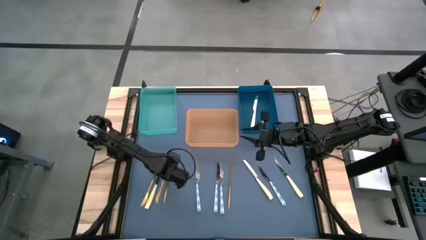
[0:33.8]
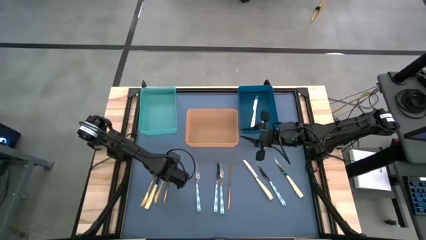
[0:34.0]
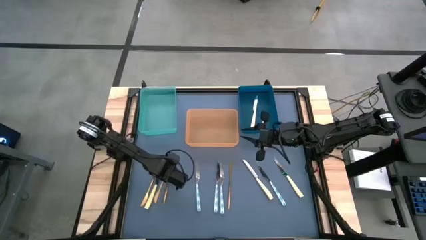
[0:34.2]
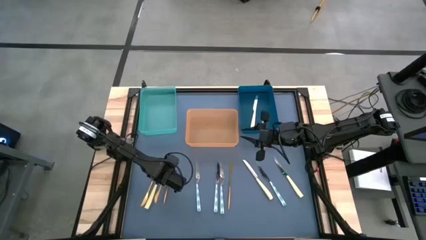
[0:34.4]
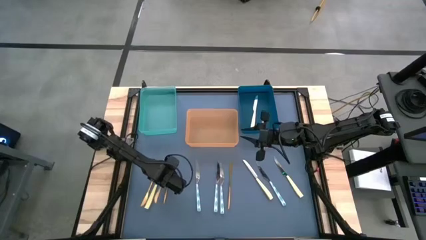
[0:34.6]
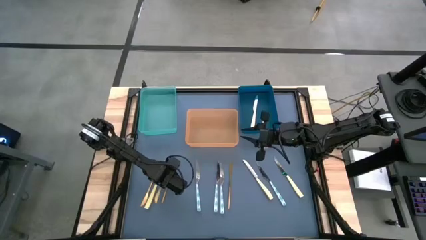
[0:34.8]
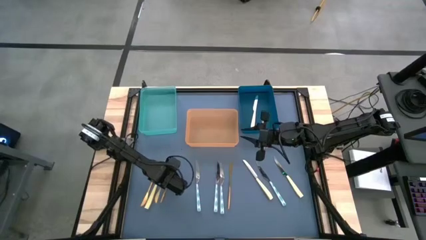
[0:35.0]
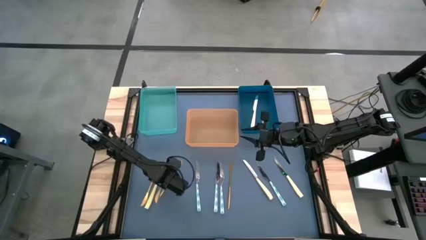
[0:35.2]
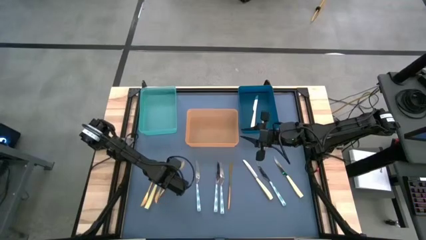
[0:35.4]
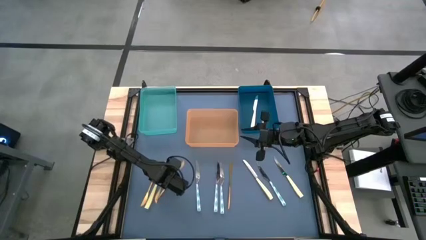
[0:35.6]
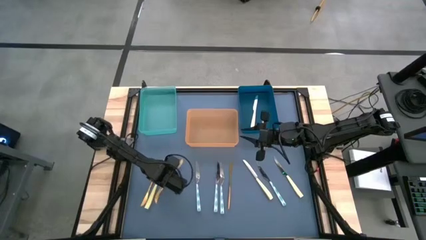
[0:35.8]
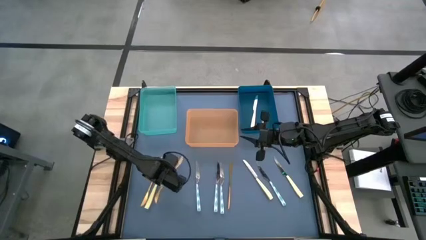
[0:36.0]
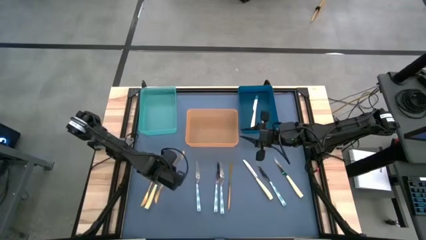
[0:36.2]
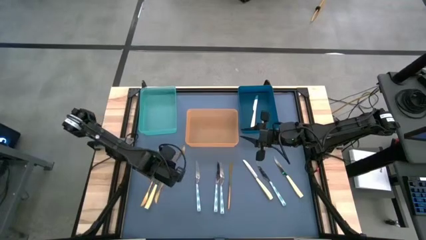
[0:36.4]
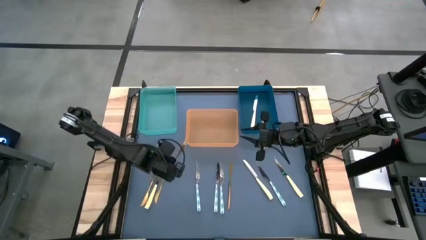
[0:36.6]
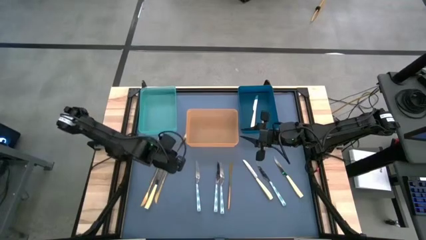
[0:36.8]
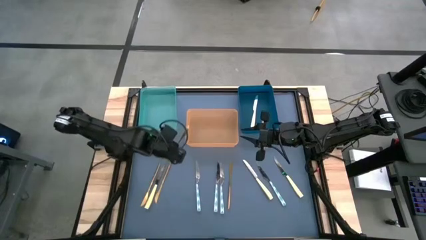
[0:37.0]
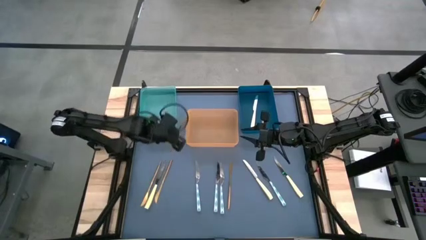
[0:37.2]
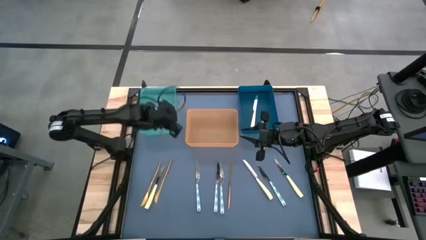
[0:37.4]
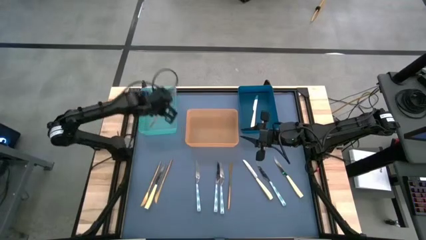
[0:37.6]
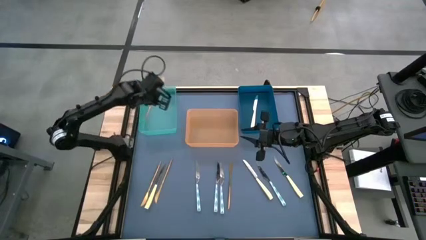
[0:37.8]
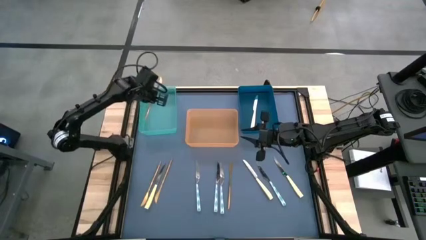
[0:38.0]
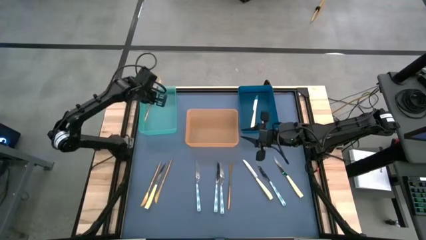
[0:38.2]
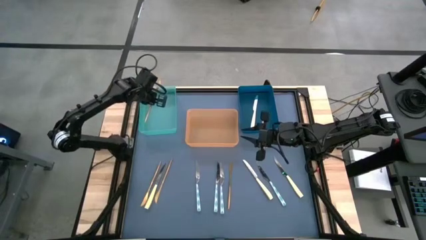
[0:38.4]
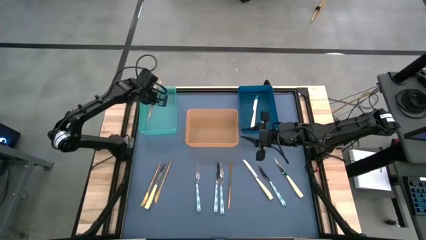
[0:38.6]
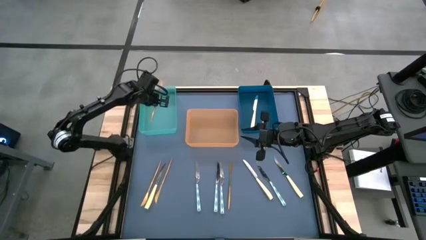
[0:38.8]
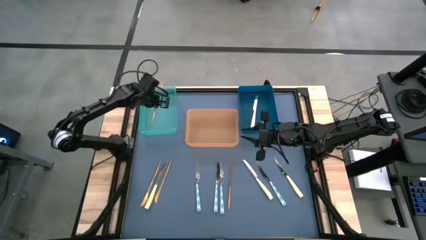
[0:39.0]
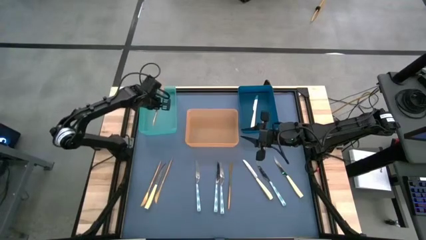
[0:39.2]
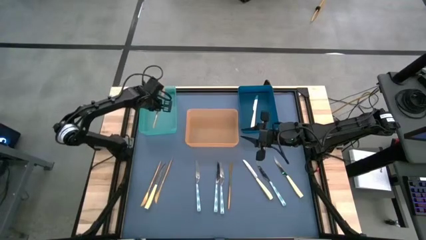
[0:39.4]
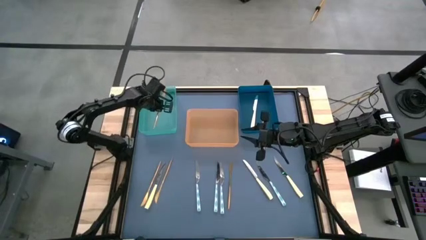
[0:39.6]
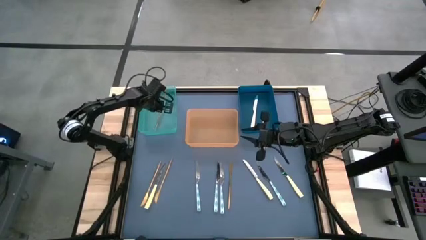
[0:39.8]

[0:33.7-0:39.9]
Task: Sort silverware by color (type)
Put the gold knife into the green bin

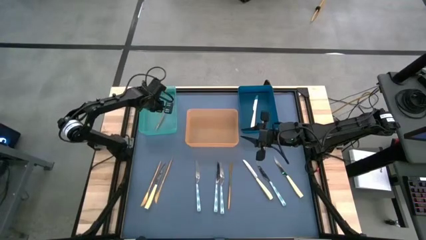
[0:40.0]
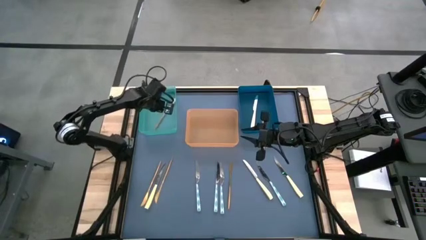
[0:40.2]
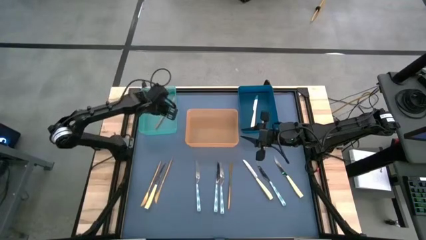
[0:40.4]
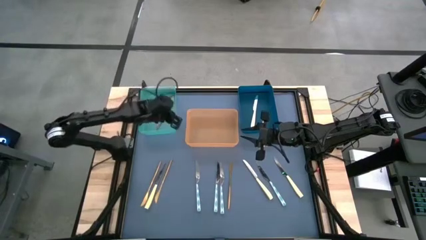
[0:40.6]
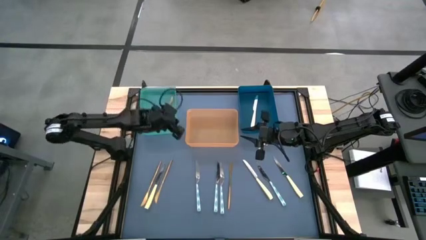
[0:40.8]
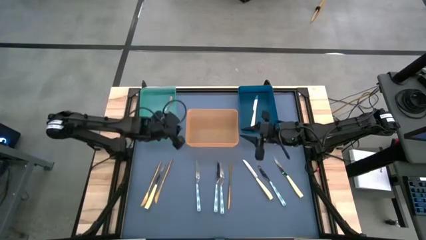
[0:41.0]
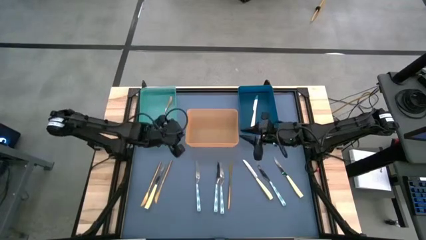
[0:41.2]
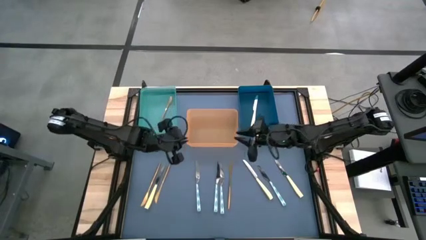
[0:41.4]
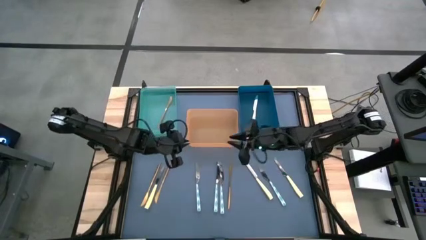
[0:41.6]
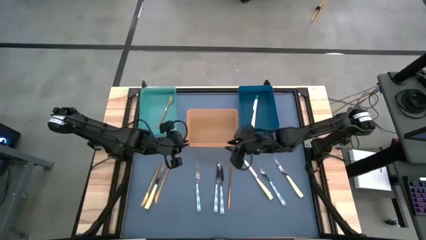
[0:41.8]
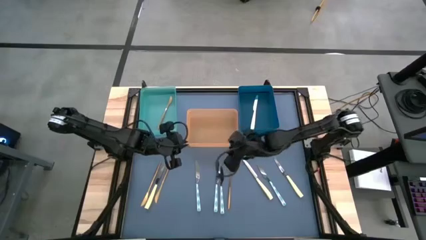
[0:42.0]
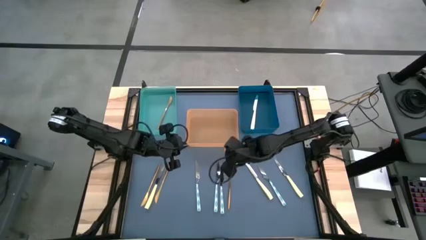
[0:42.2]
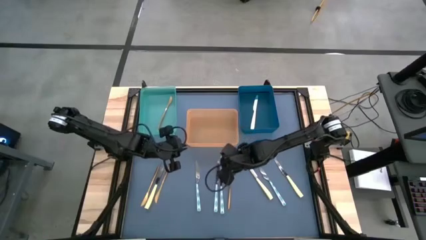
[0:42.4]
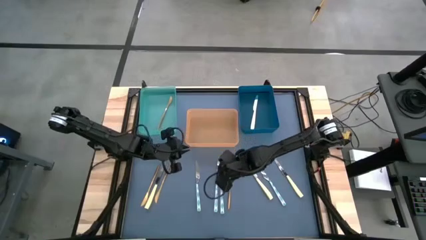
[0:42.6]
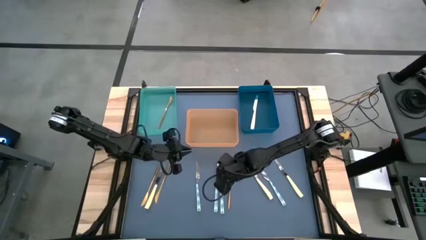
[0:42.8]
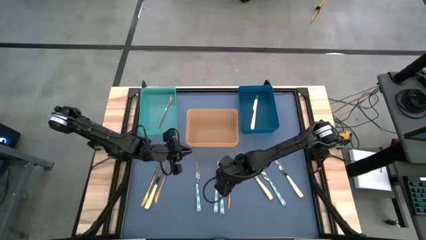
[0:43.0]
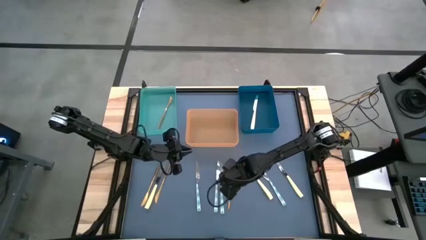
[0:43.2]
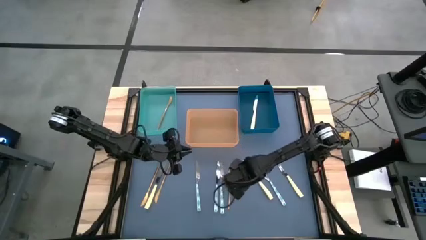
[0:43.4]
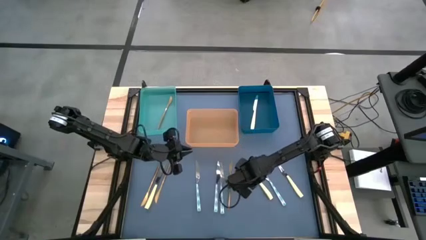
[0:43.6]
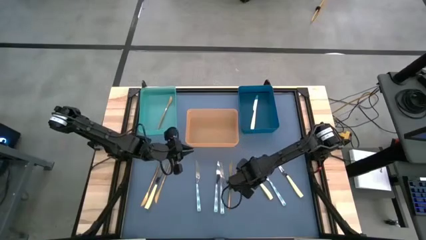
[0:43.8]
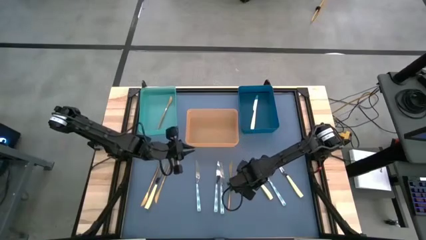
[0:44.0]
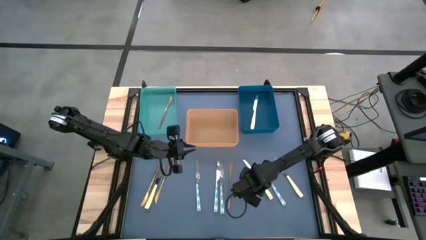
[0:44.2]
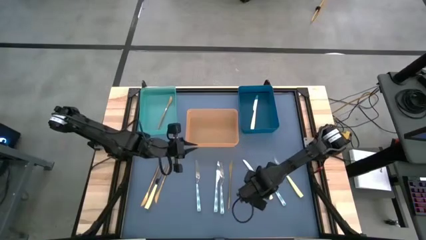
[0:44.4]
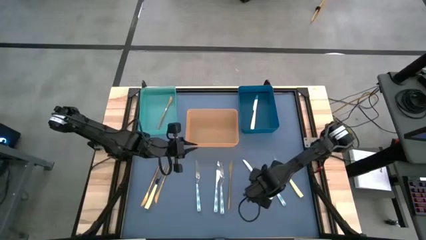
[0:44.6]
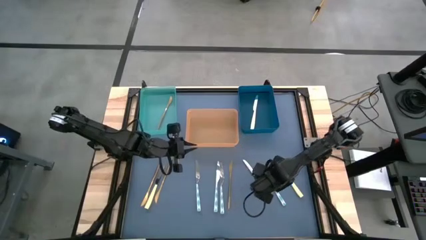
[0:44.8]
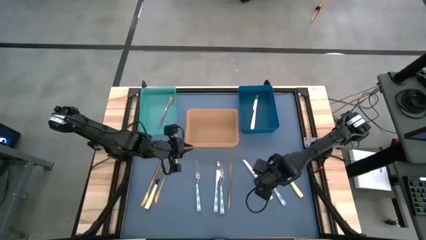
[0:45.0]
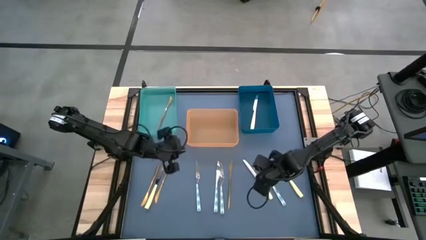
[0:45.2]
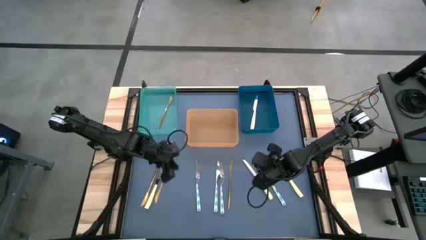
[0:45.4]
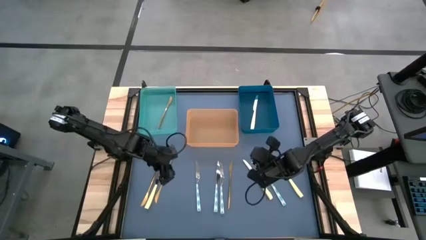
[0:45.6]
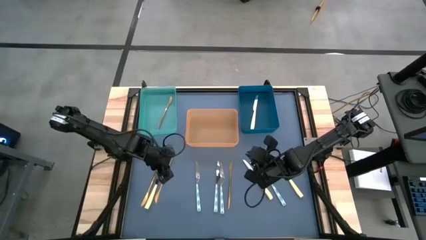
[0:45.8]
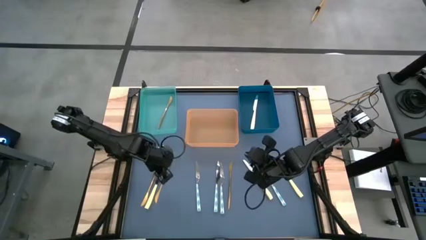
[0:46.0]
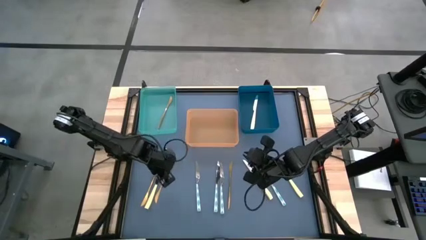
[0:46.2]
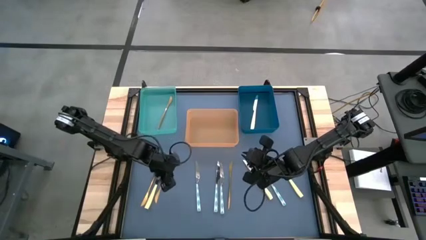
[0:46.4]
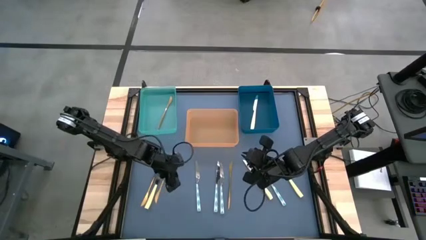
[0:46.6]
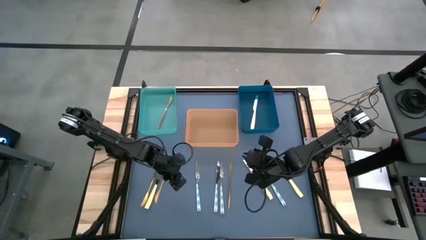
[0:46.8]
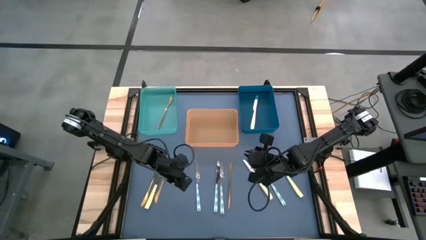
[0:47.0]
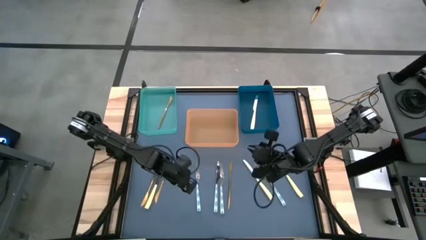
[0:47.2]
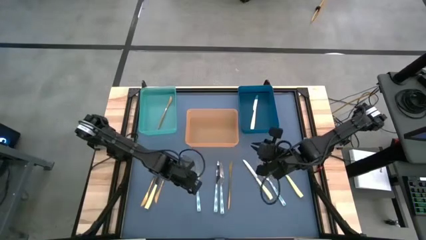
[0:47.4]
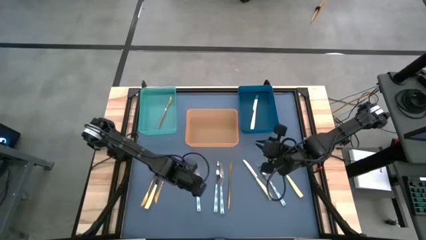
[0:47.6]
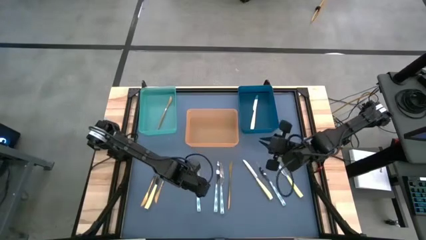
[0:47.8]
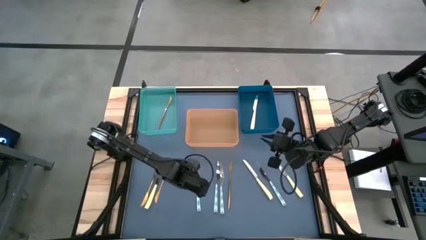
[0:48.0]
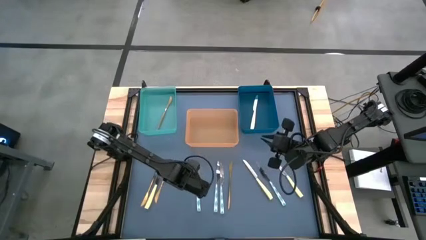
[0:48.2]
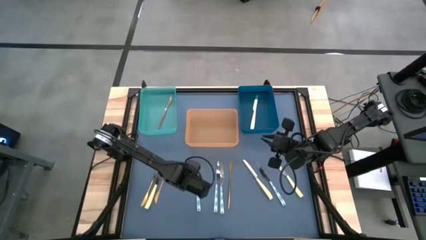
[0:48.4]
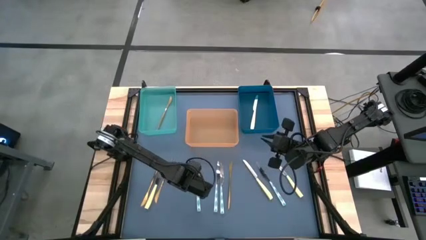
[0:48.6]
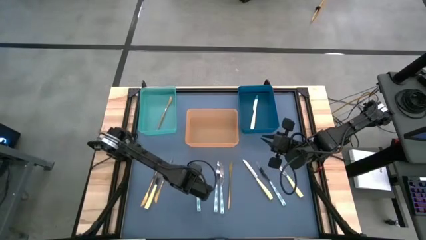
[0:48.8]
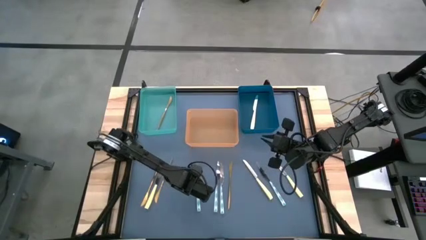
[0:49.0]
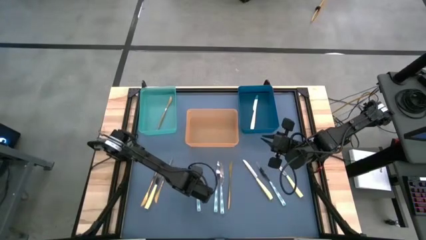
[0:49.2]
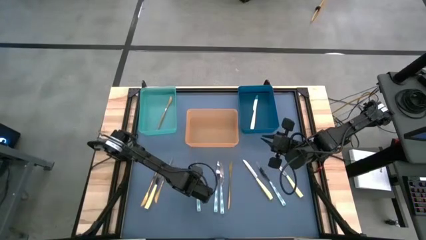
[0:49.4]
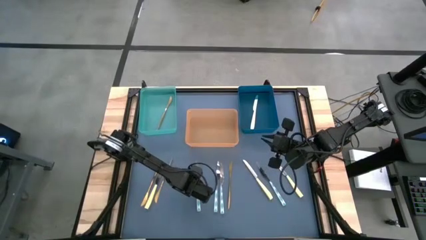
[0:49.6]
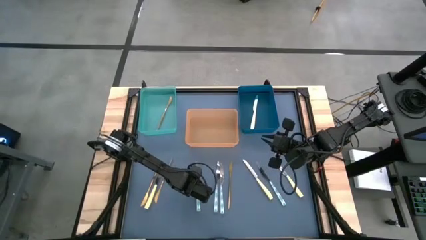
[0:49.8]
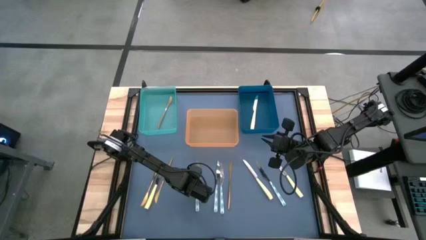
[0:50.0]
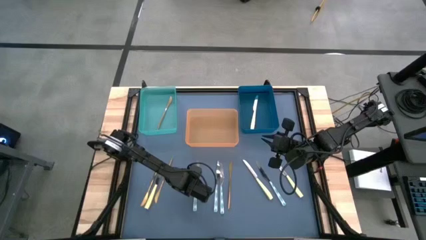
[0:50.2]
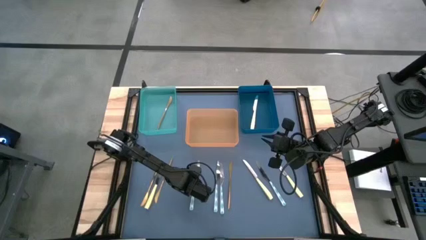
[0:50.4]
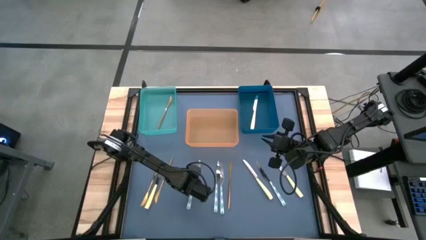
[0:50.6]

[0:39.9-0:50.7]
Put the white knife in the orange bin
